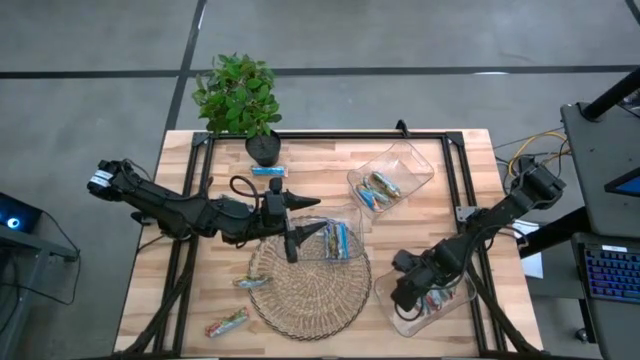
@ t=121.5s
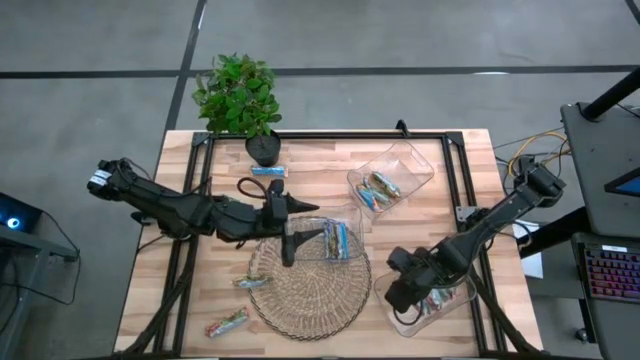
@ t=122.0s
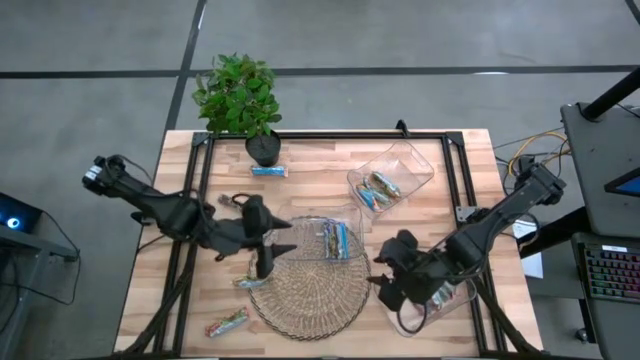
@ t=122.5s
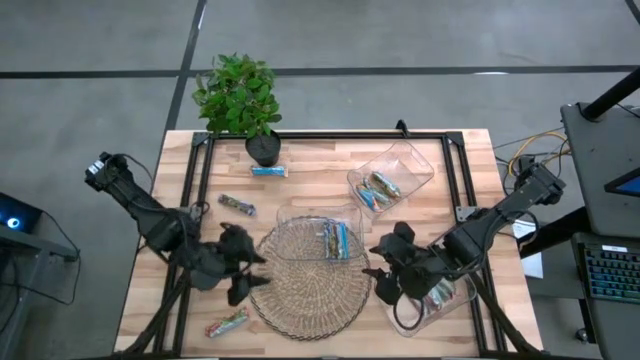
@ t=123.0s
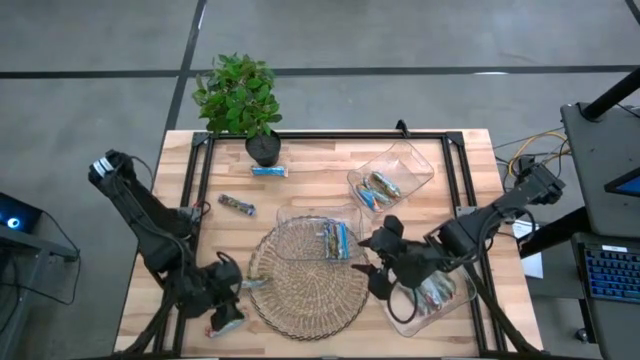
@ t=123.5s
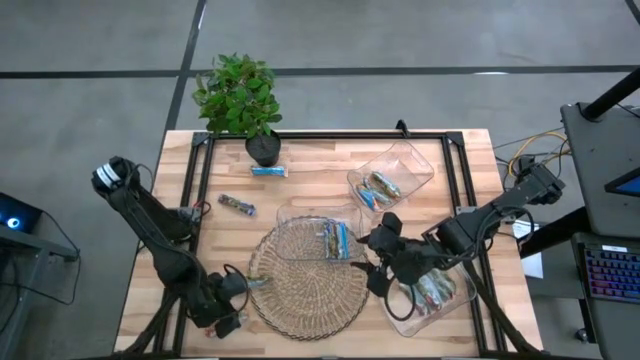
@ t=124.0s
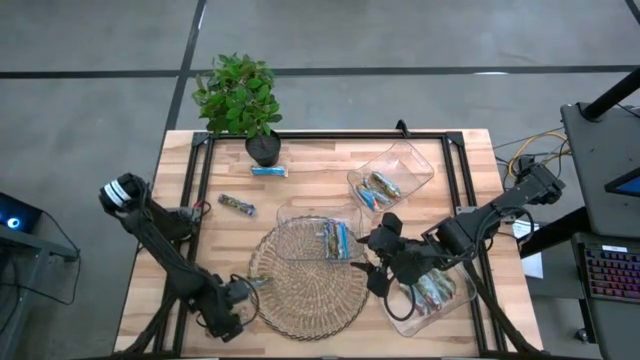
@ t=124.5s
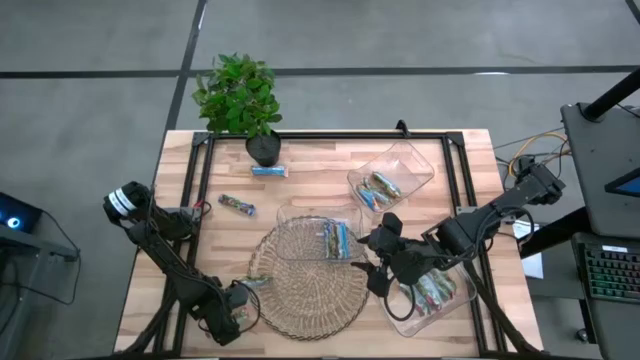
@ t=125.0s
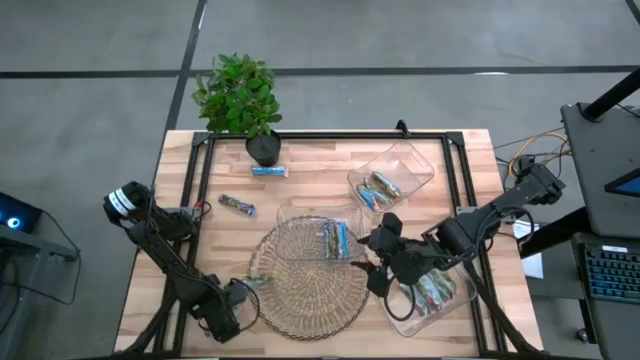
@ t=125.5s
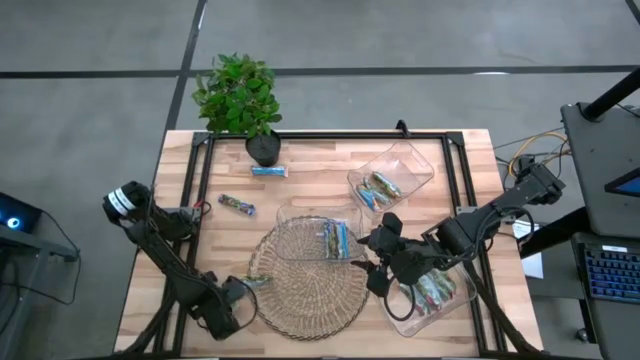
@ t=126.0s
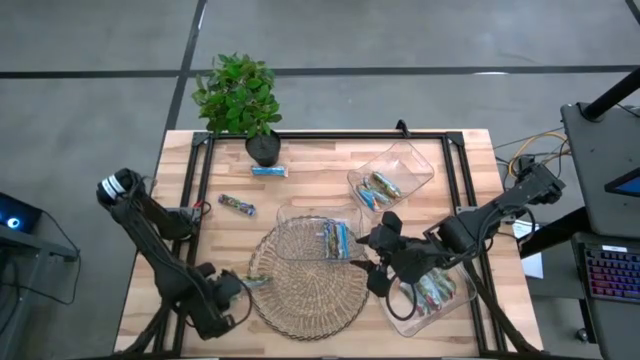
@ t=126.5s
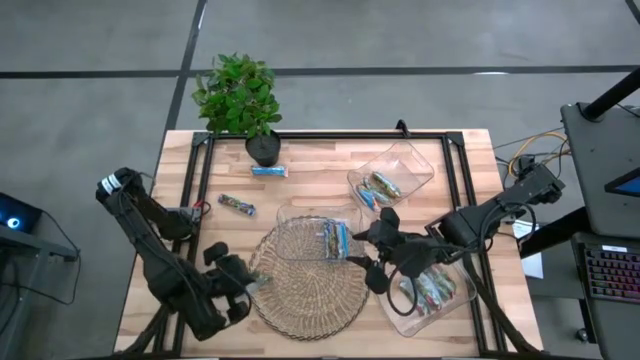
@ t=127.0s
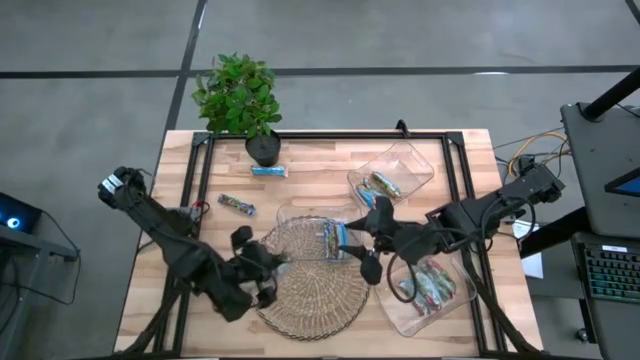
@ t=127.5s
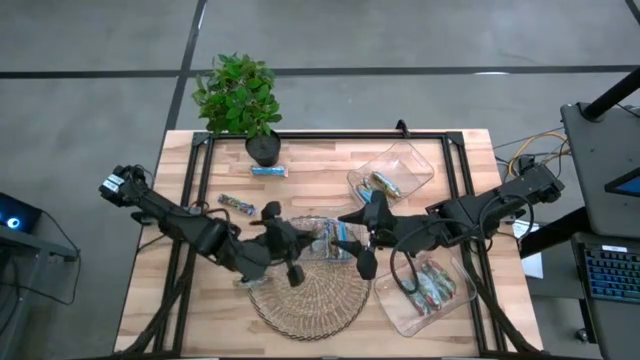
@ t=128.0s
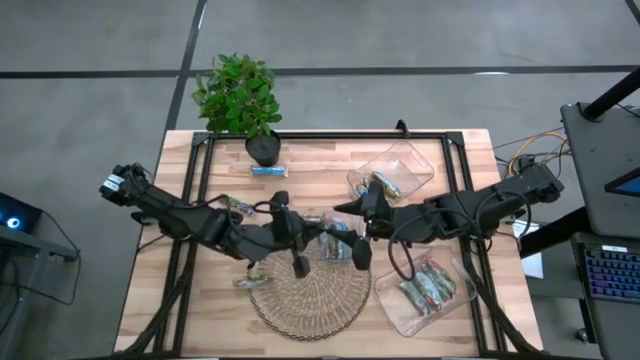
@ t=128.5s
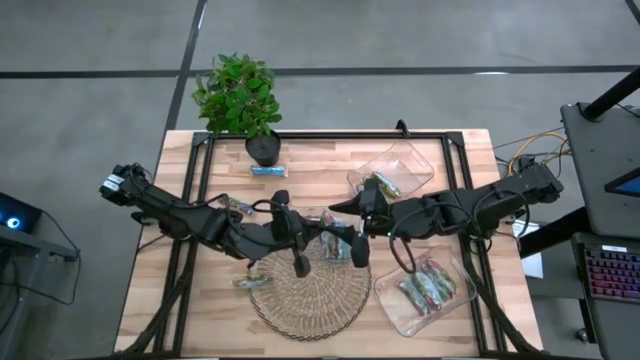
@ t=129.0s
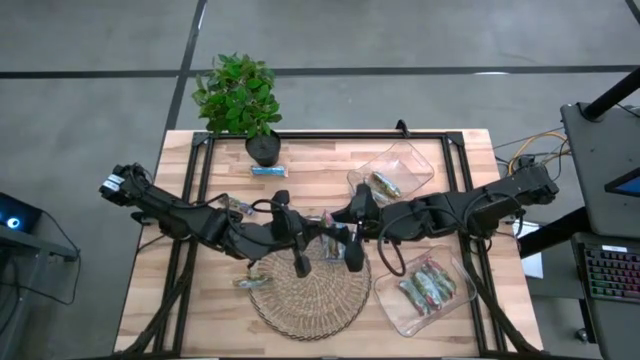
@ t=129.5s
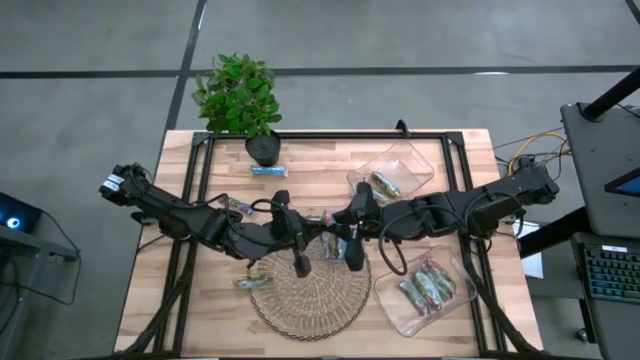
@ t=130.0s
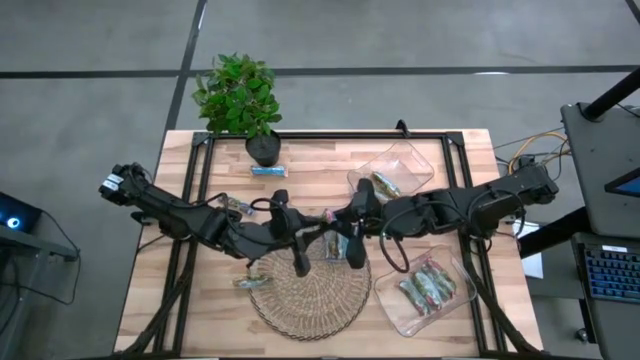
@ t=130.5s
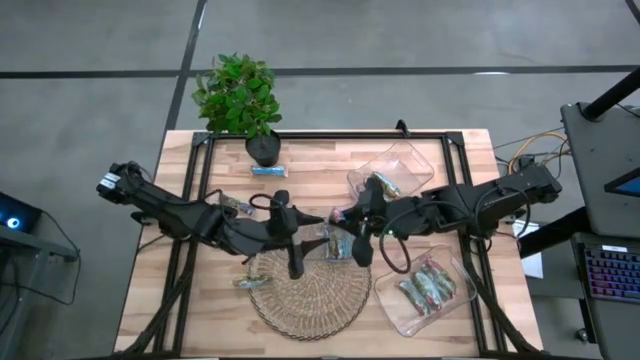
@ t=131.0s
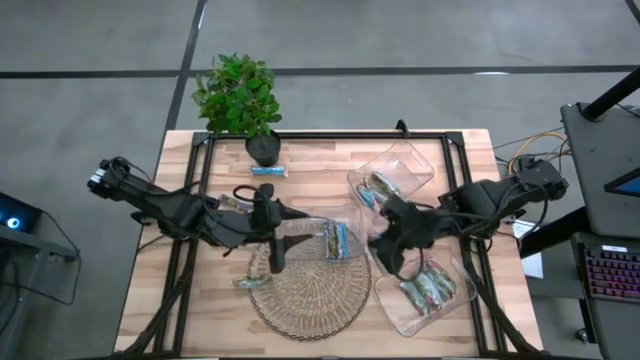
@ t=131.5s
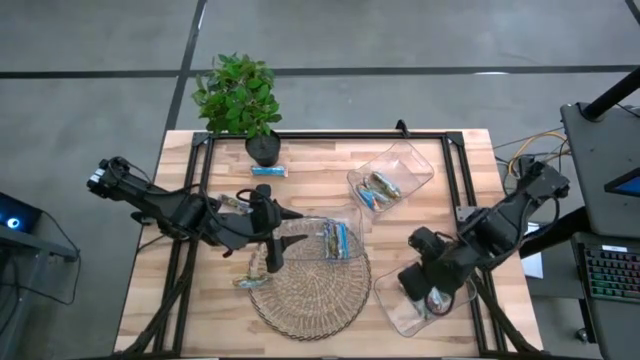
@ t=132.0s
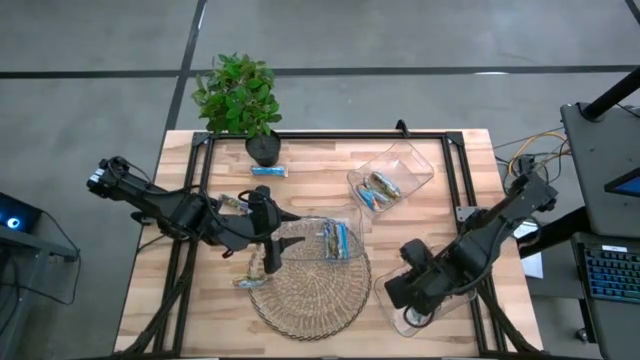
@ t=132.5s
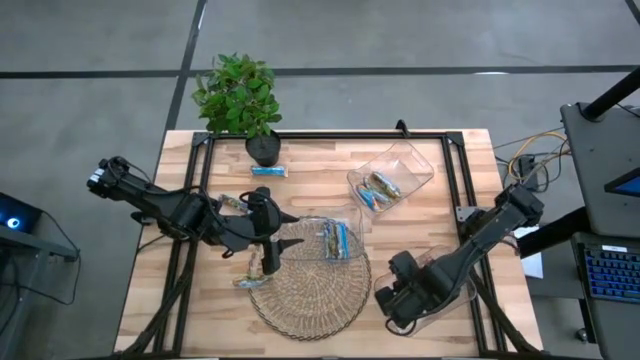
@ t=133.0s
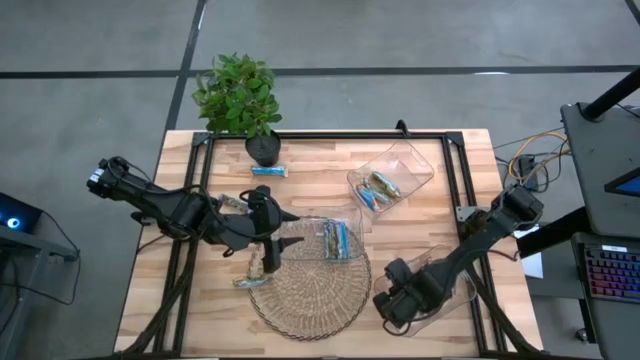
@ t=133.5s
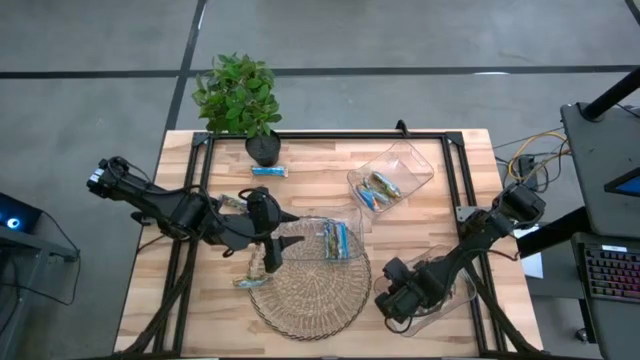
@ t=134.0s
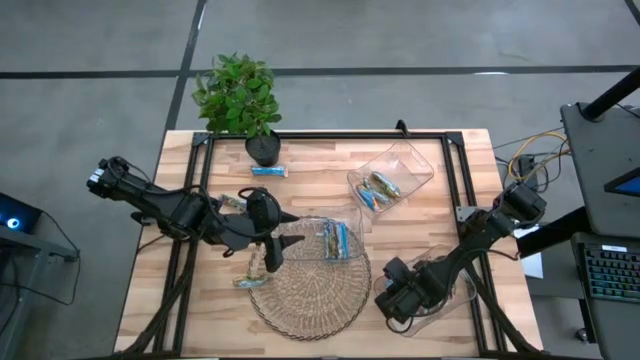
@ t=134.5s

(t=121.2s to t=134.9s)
Task: Pick and place Granola Bars by type
Put the red granola bar into the bottom transparent bin

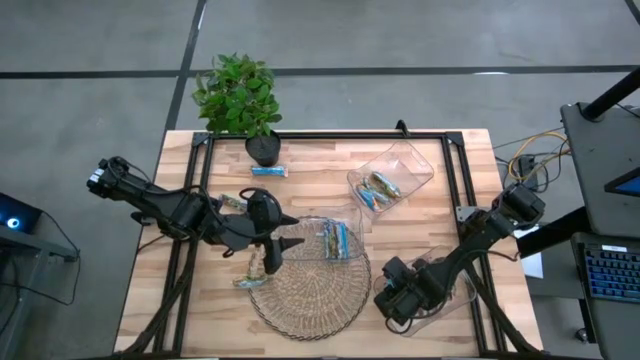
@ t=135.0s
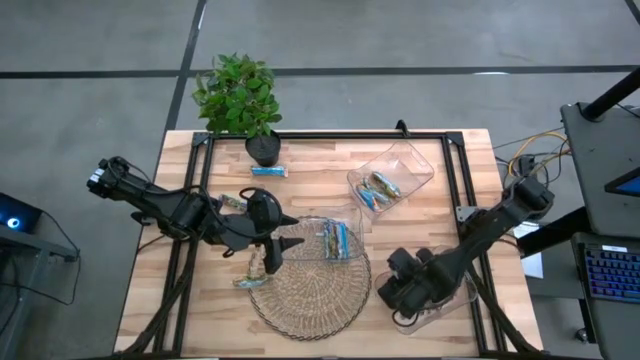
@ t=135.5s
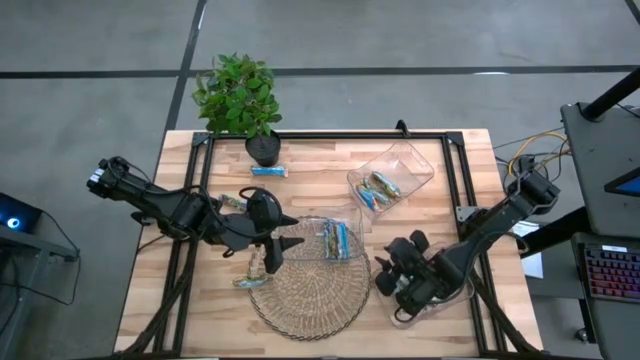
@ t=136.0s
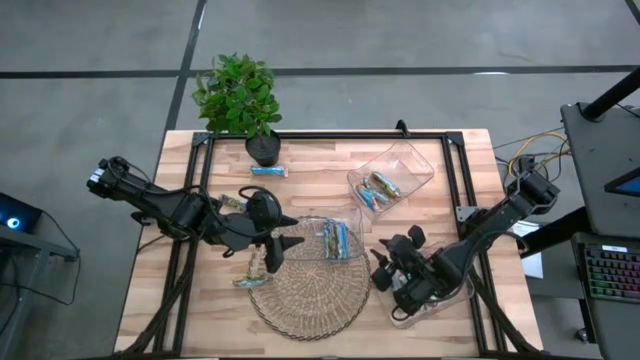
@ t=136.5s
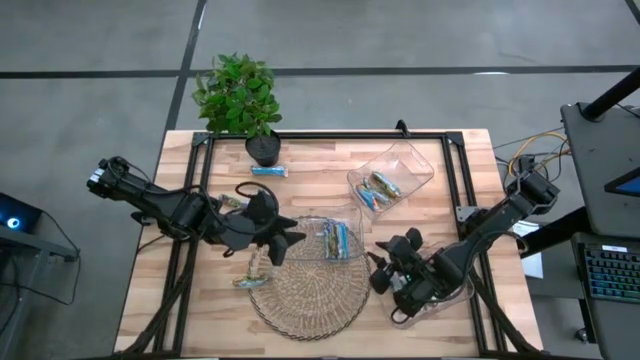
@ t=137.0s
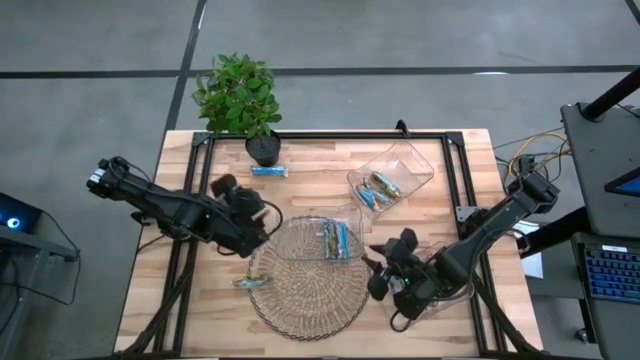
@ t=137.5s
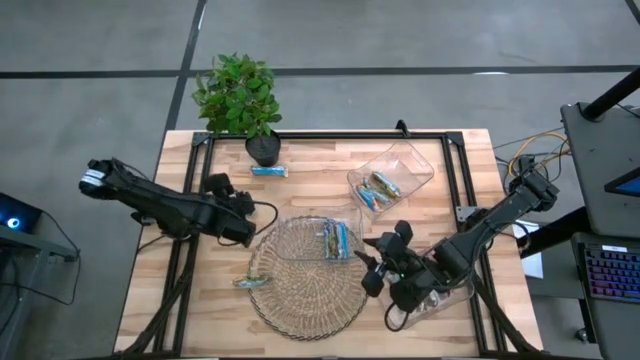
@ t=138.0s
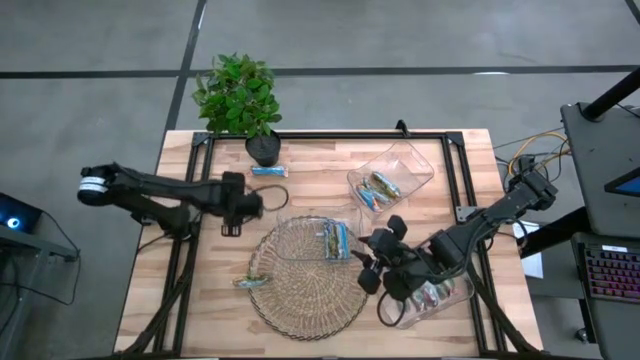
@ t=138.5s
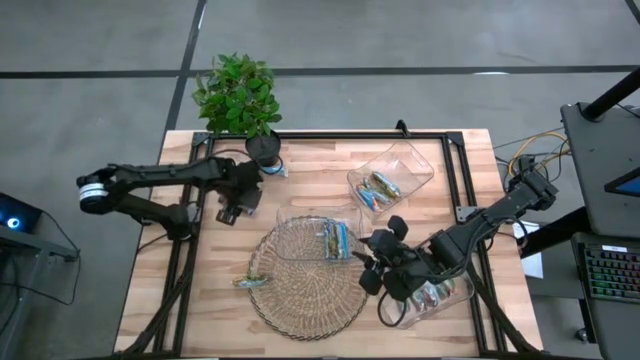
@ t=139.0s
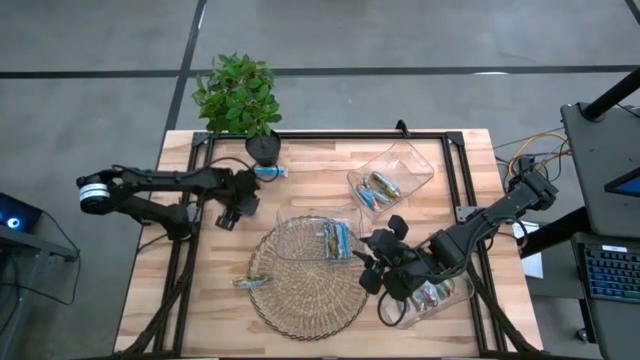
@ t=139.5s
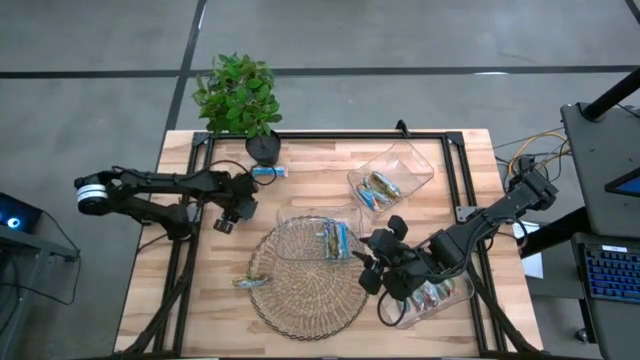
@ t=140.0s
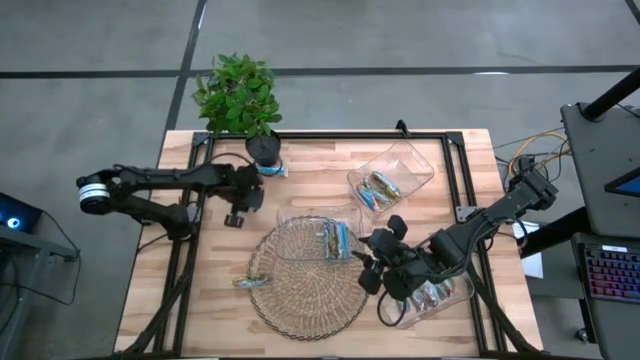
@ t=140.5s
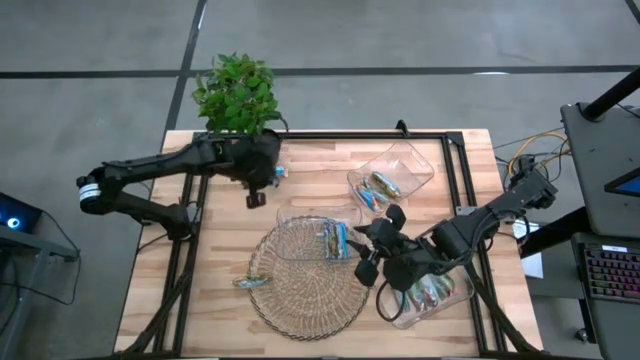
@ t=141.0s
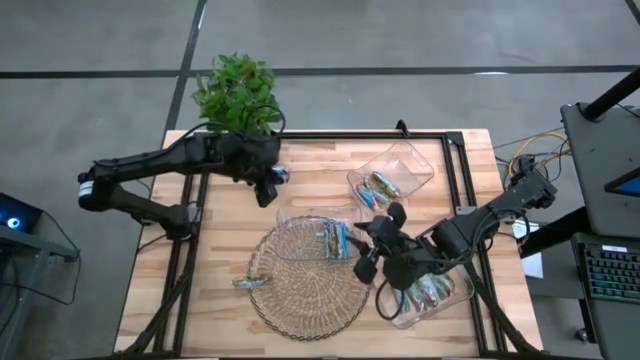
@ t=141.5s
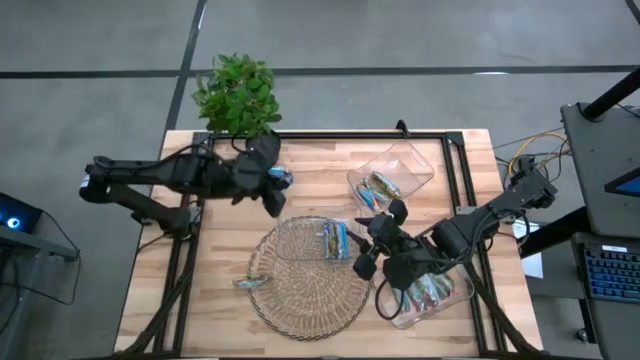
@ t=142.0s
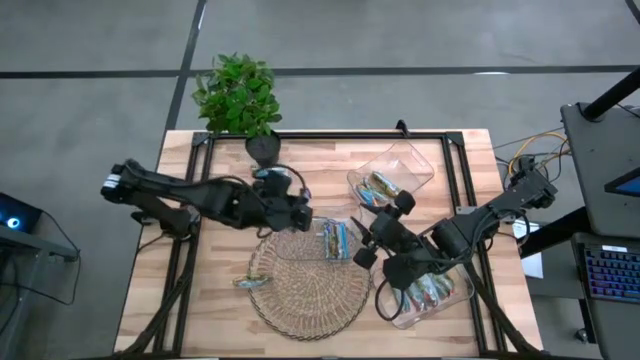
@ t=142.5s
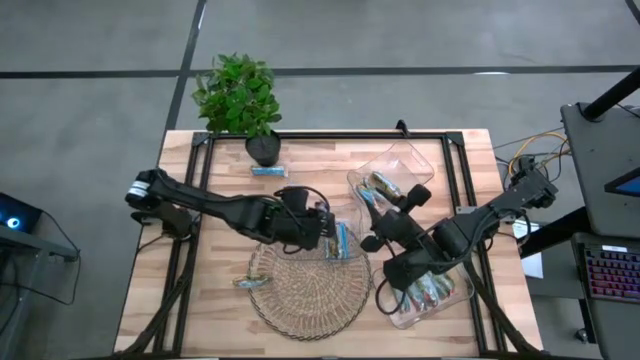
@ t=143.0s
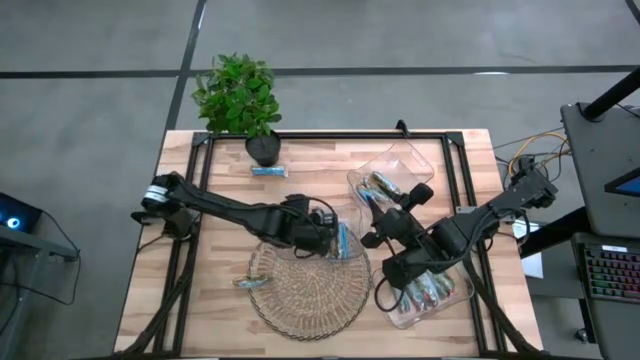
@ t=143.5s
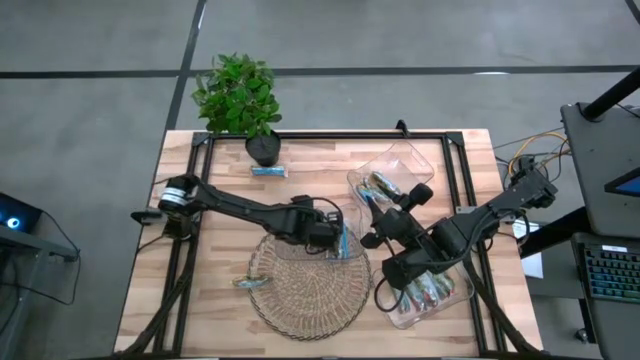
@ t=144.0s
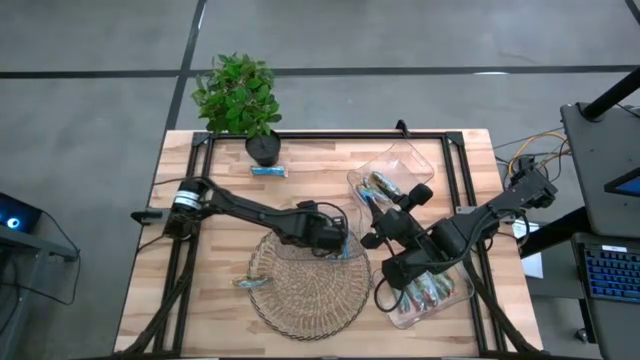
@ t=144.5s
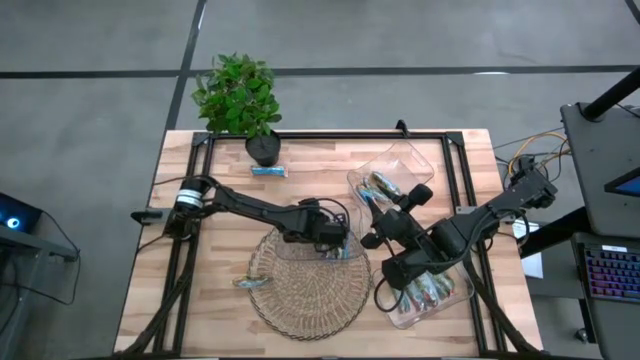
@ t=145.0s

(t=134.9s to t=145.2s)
Put the blue granola bar into the middle transparent bin
